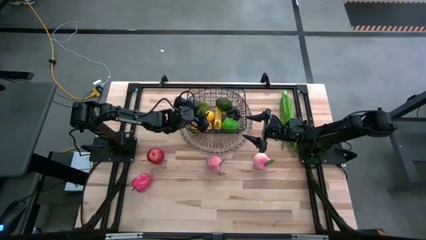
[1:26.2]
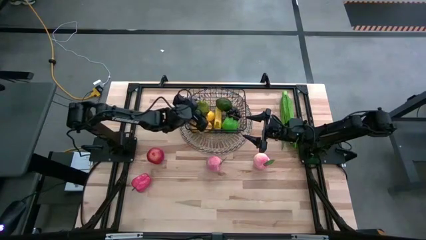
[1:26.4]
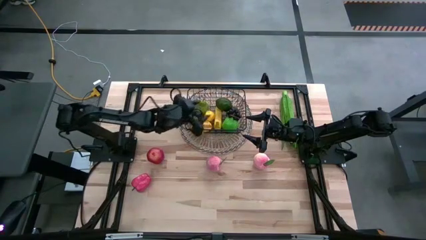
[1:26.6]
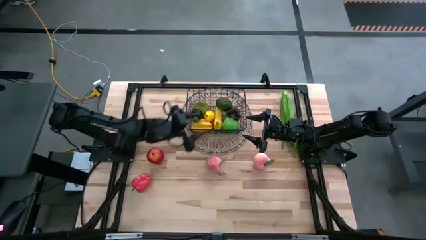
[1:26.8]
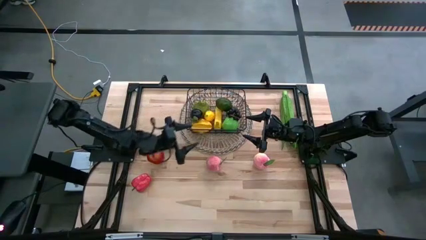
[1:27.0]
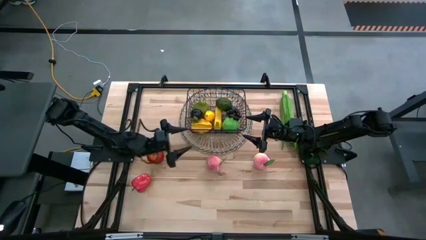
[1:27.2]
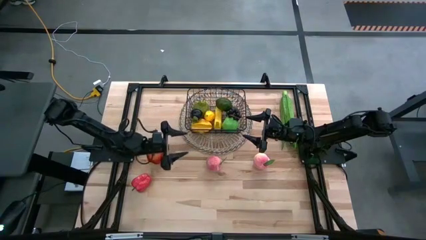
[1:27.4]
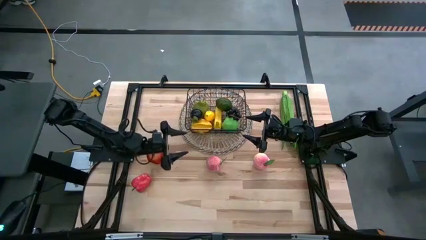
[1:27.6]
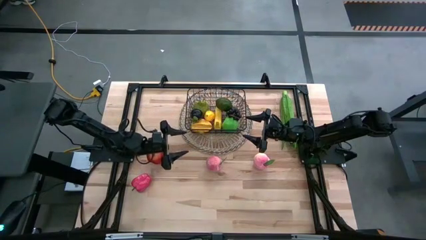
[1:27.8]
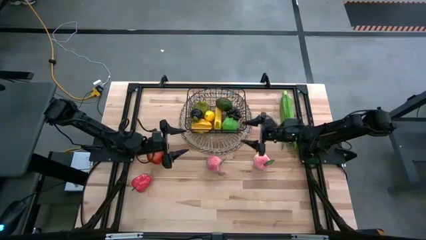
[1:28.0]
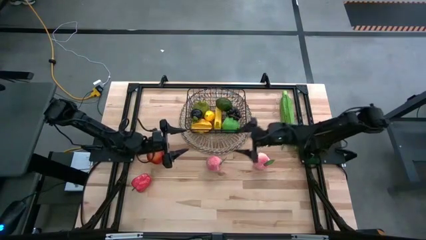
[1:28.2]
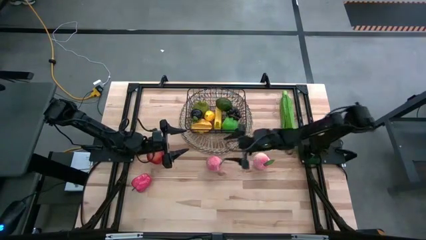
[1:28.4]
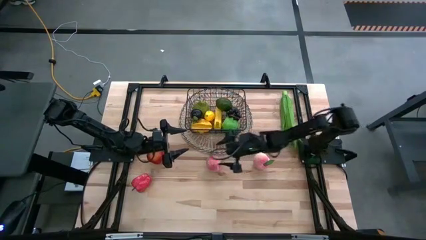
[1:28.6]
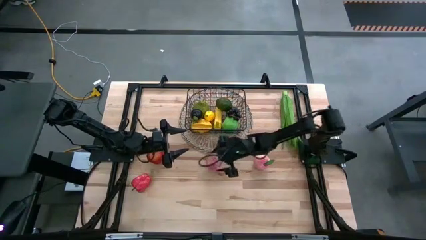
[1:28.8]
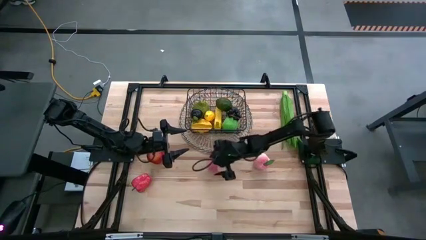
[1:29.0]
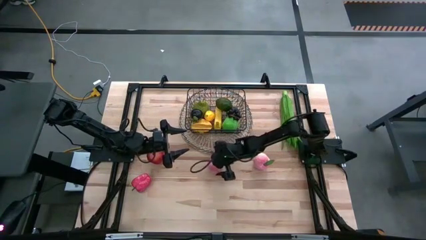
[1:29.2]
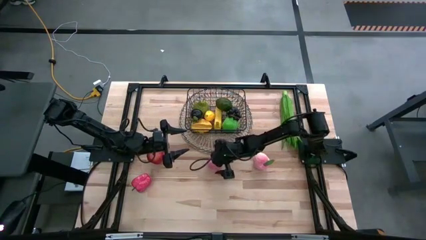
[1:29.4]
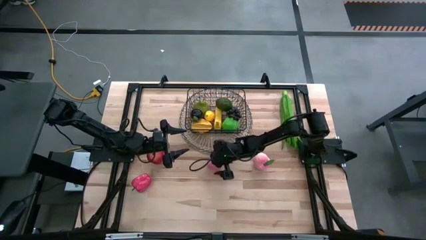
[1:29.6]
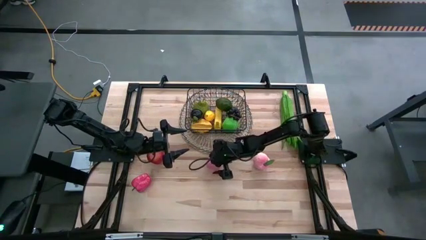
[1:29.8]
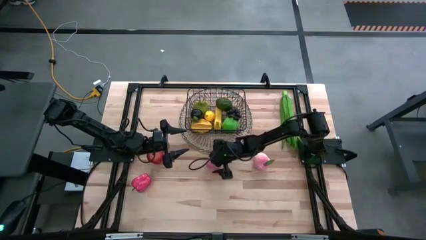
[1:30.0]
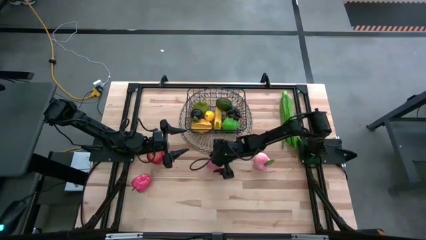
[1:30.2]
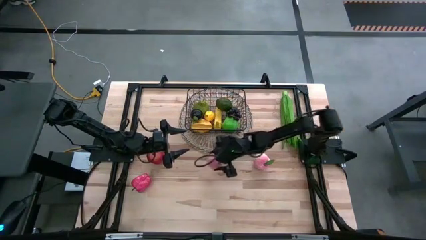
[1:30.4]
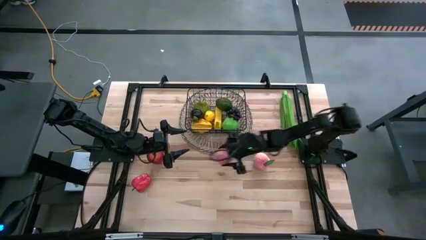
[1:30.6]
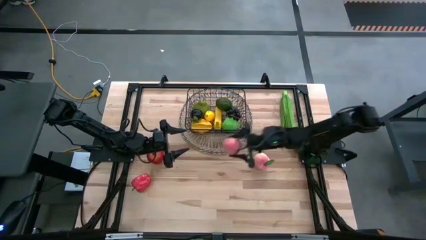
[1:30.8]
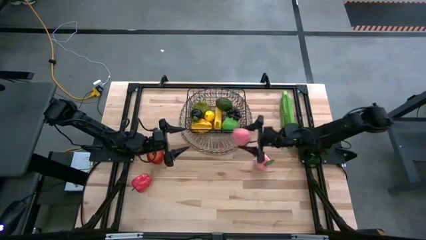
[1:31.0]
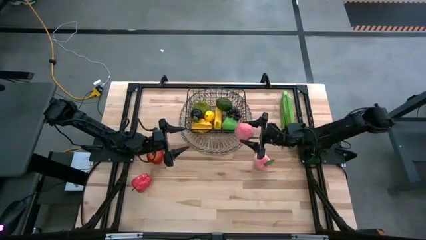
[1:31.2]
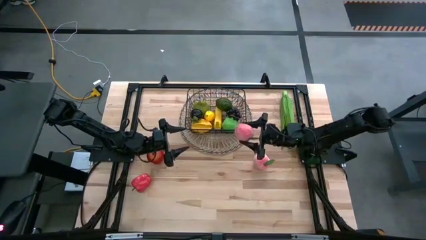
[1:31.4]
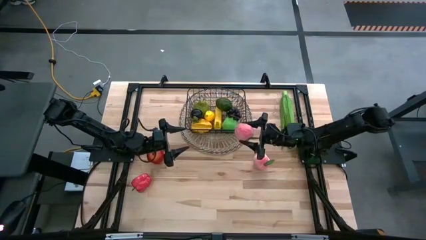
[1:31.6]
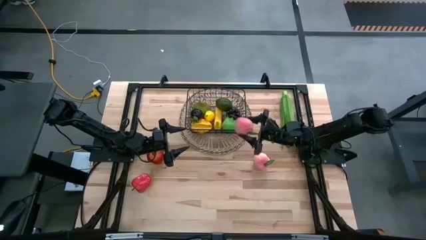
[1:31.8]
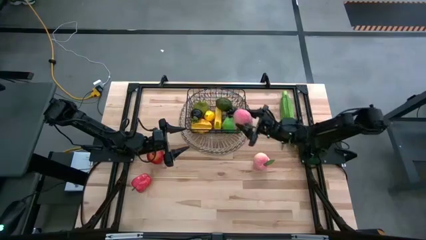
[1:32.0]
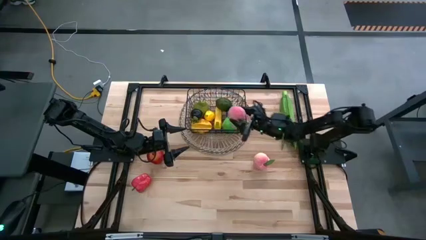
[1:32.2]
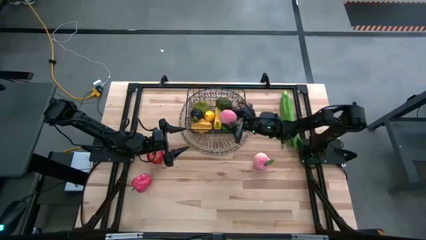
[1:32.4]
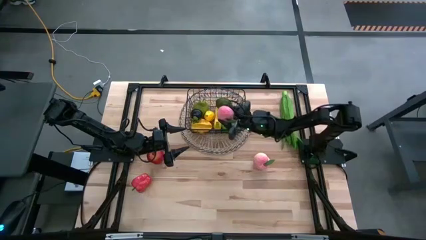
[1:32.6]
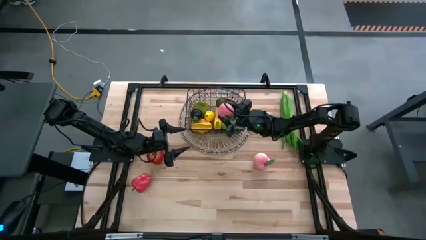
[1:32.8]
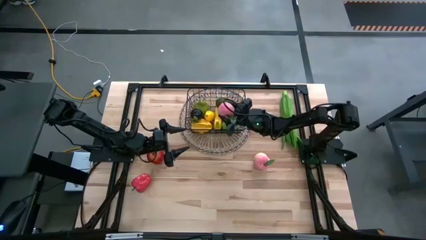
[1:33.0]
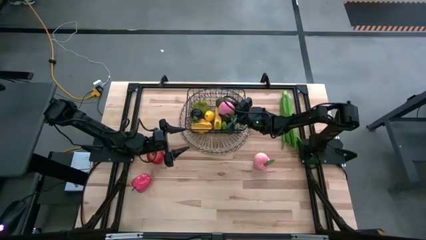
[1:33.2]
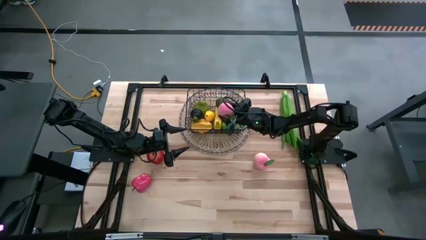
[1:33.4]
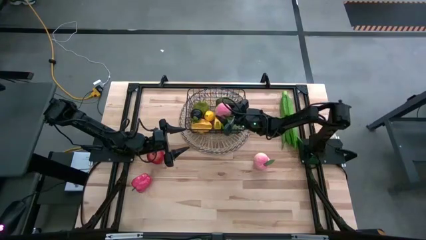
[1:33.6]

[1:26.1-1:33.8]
Task: Build produce basket
Put the left pink peach into the black wire basket

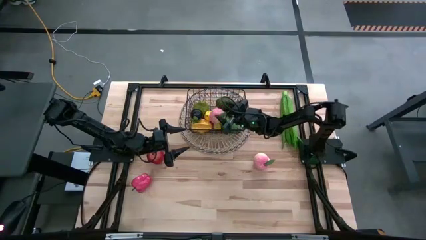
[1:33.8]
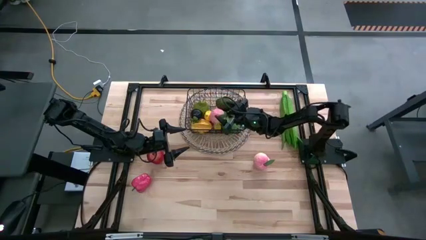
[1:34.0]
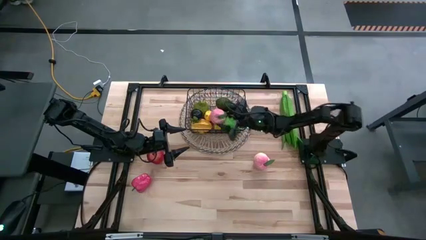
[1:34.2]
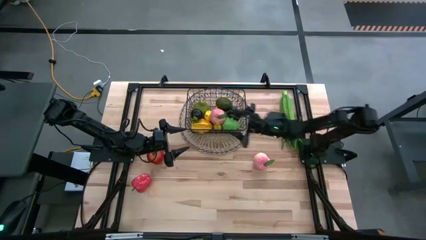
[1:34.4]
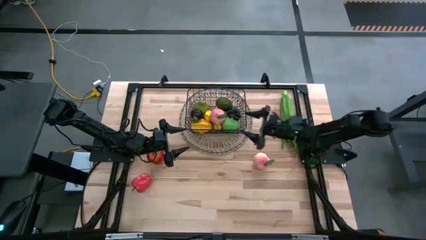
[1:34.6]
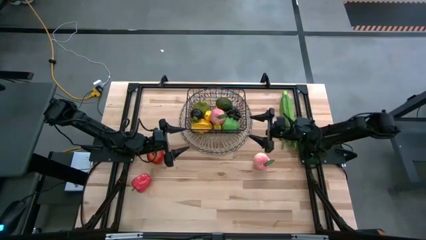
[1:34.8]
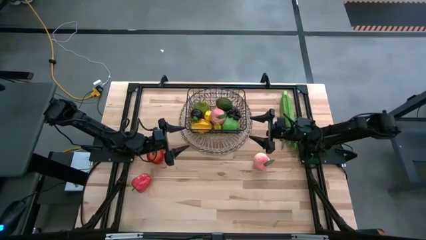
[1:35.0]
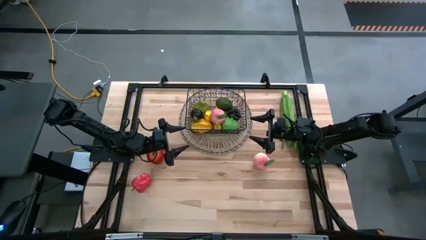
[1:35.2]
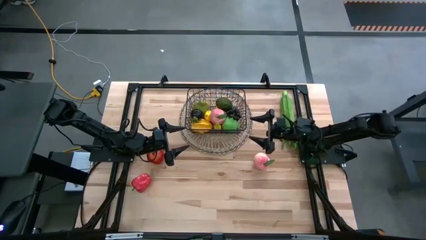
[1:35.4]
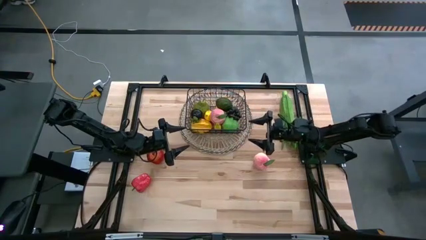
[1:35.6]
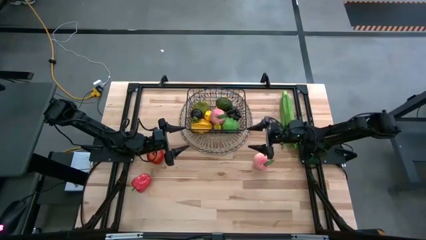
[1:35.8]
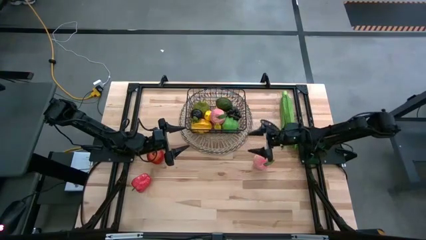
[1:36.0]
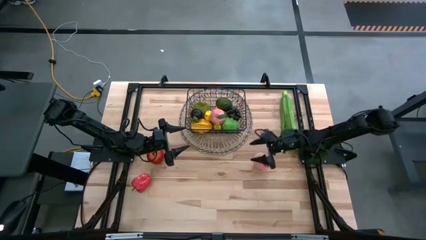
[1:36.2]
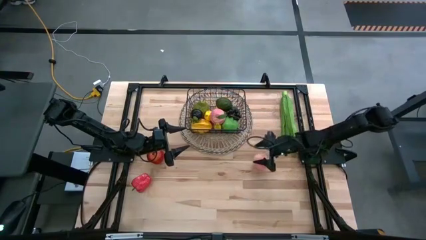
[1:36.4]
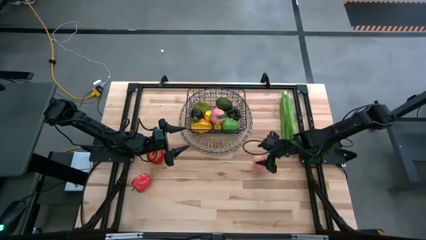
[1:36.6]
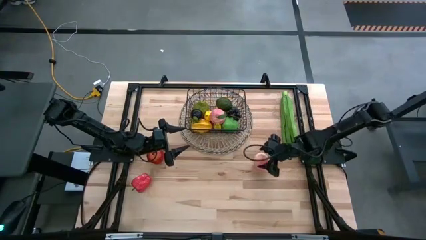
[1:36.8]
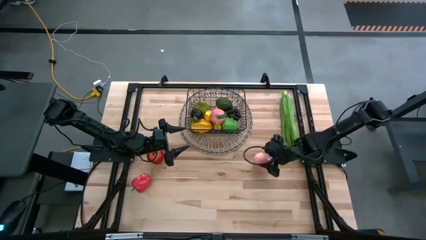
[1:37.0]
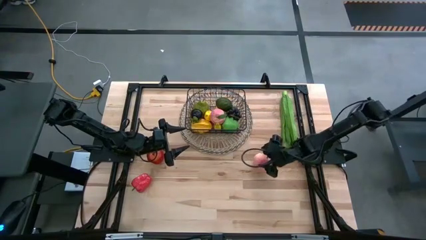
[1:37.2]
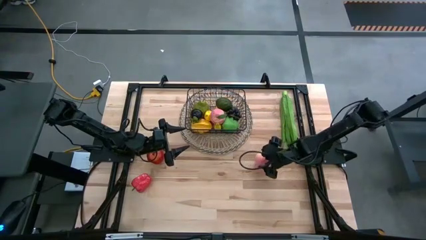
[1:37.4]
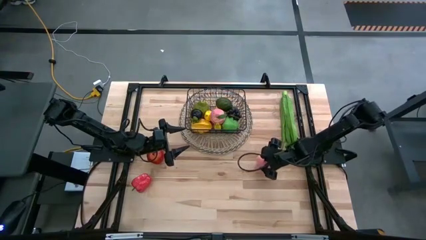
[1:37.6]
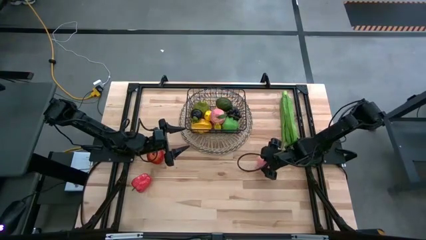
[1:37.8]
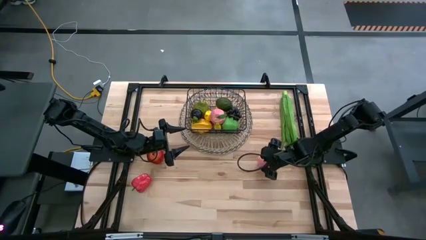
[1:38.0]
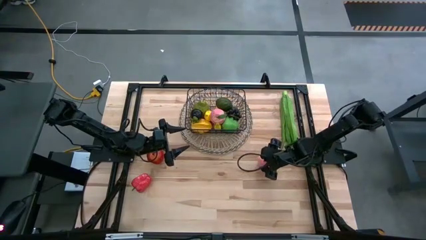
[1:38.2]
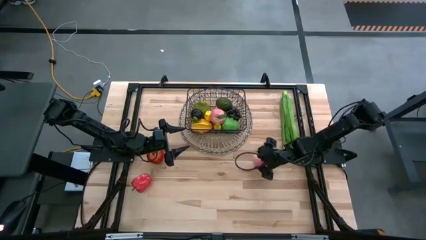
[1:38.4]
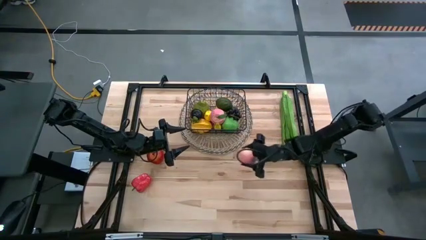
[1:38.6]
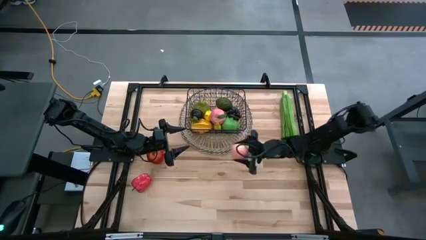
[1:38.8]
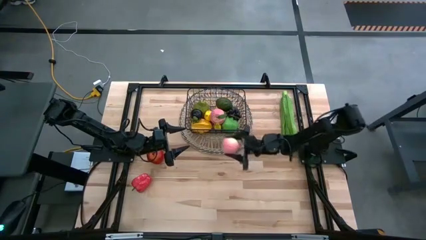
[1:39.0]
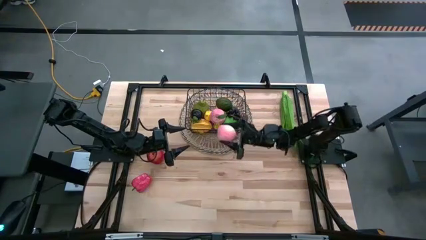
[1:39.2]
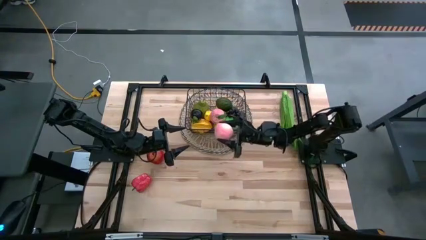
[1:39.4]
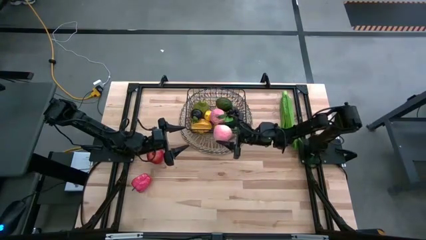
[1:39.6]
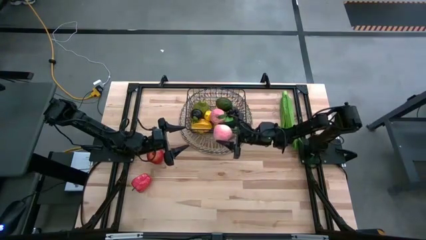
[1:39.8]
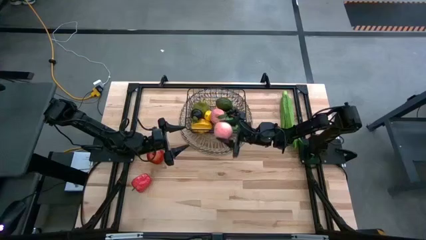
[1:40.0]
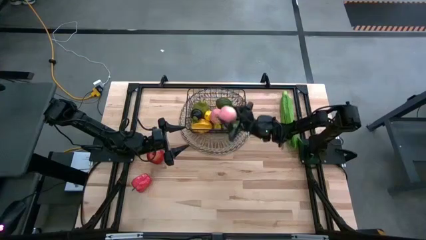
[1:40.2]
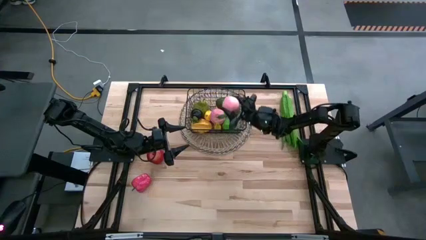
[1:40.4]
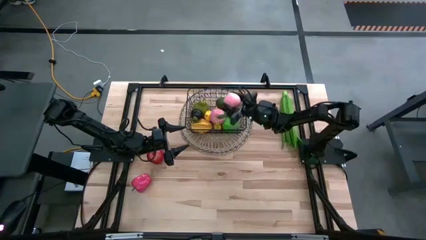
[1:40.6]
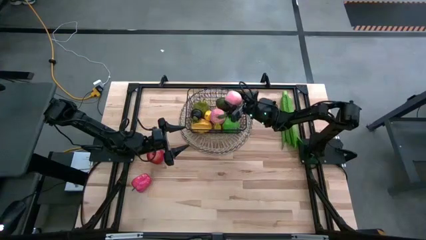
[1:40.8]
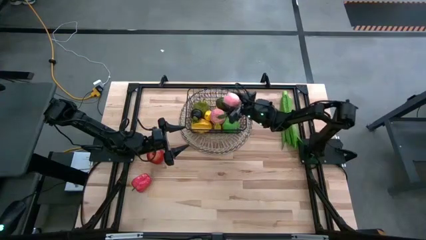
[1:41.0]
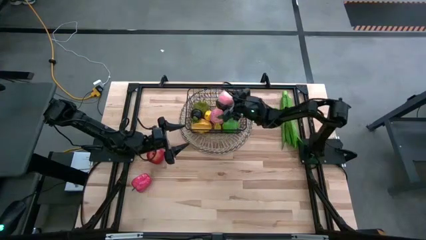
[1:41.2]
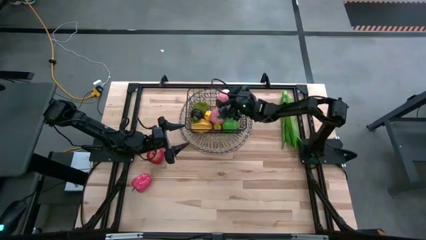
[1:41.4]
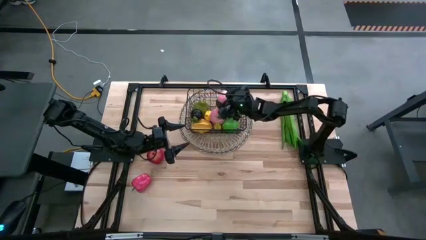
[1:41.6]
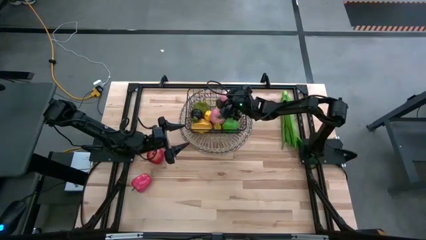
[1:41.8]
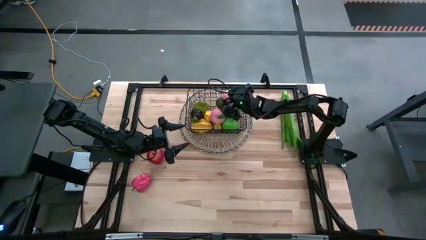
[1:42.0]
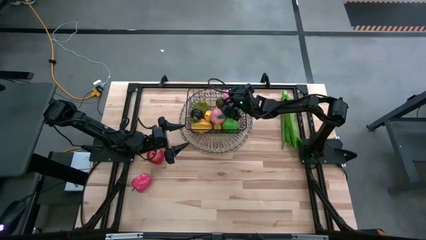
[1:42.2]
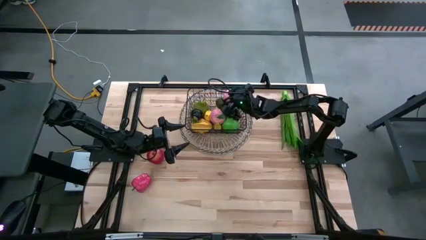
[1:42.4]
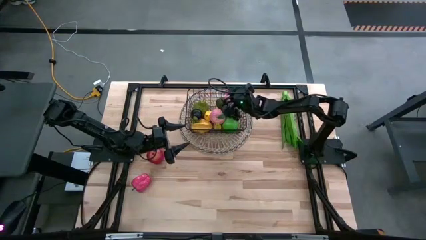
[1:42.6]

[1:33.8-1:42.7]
Put the pink peach into the black wire basket
